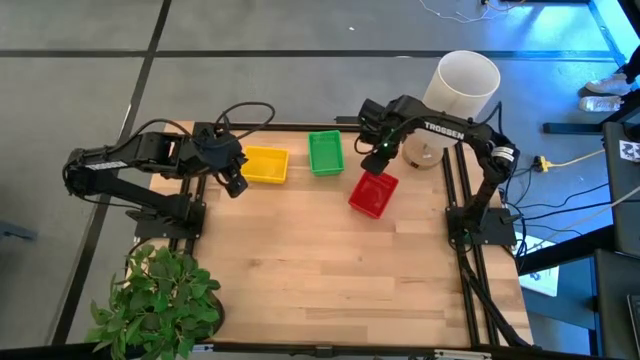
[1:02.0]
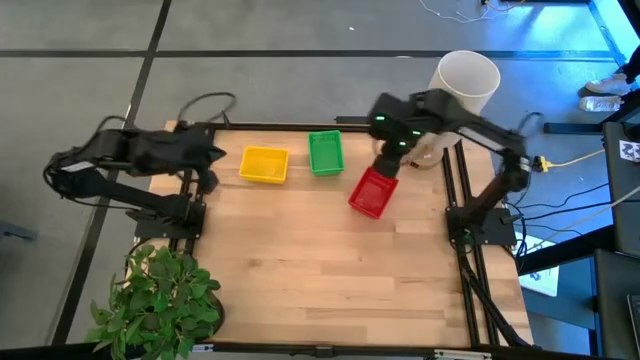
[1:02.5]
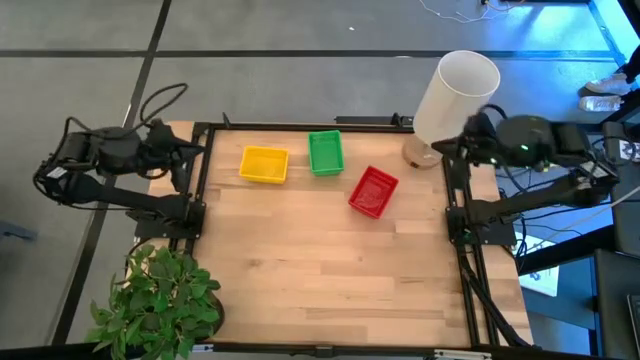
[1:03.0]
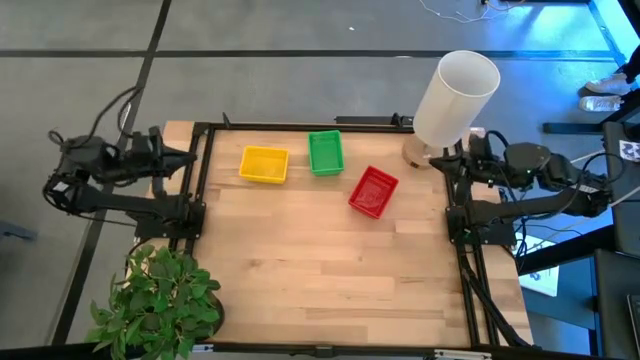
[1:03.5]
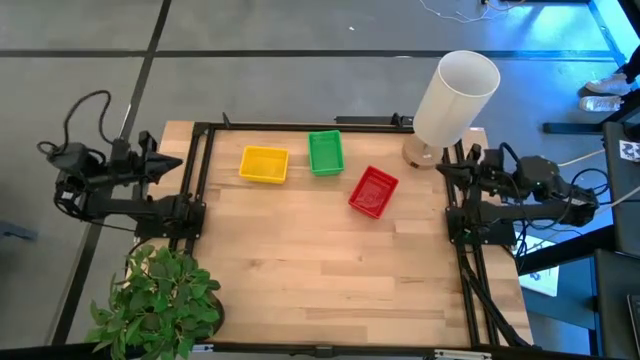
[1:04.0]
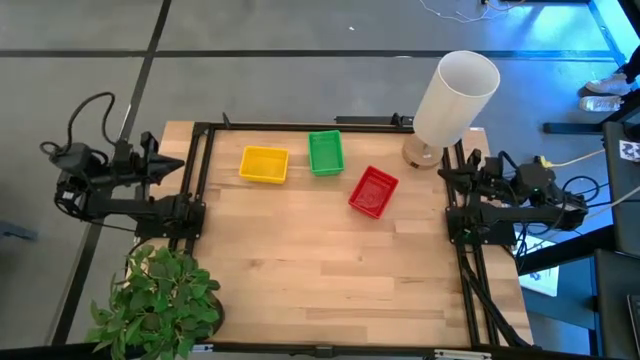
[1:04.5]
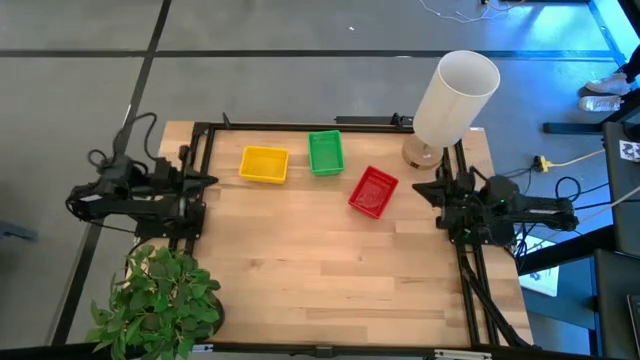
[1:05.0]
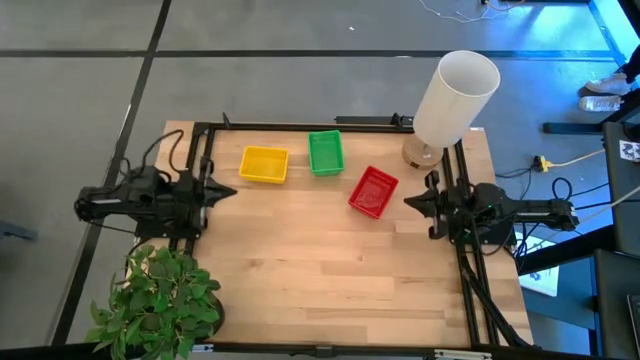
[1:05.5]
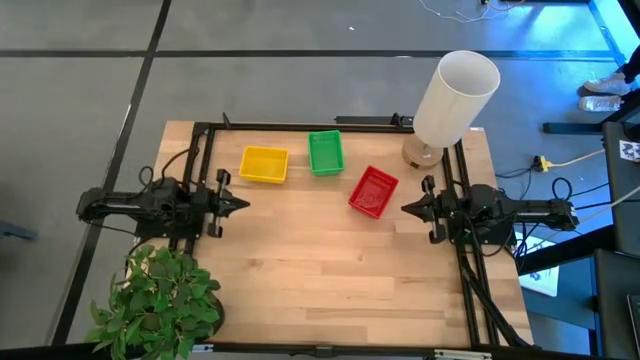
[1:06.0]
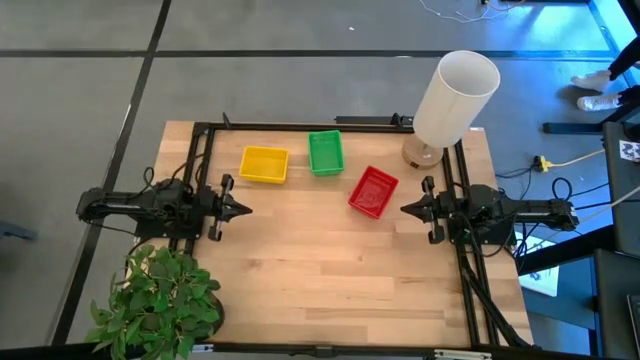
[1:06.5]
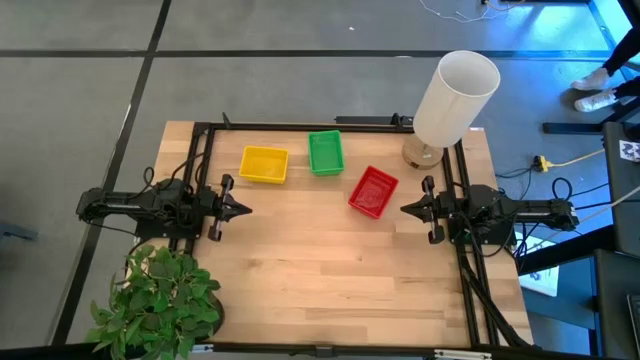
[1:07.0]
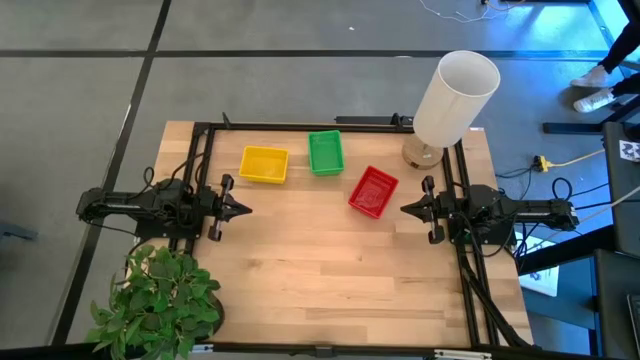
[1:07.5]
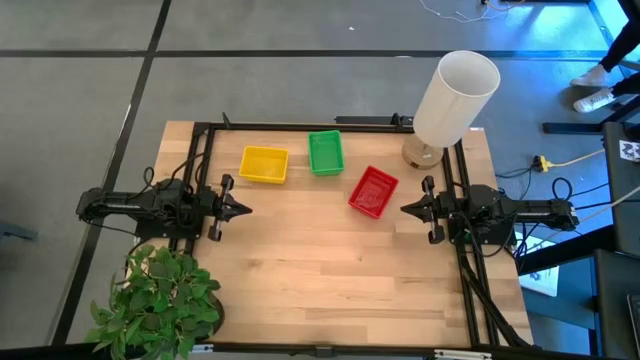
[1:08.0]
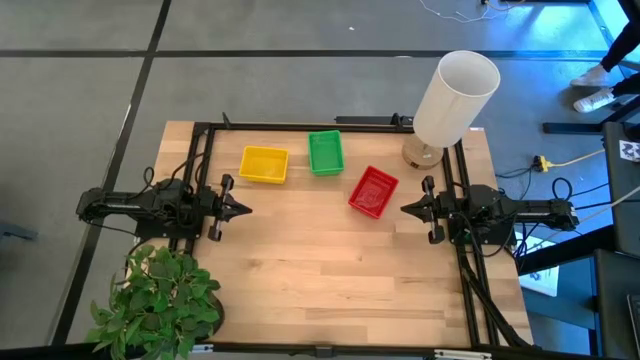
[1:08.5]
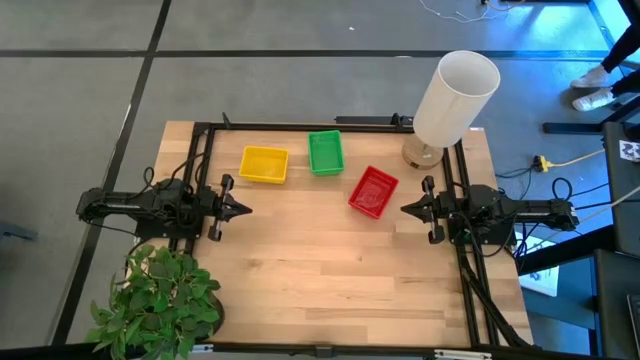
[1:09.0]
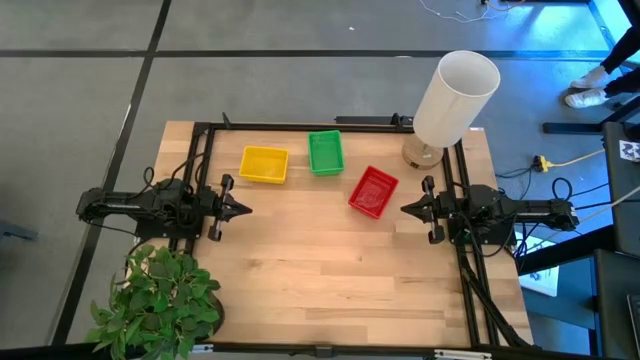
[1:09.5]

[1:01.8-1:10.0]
Return to home position

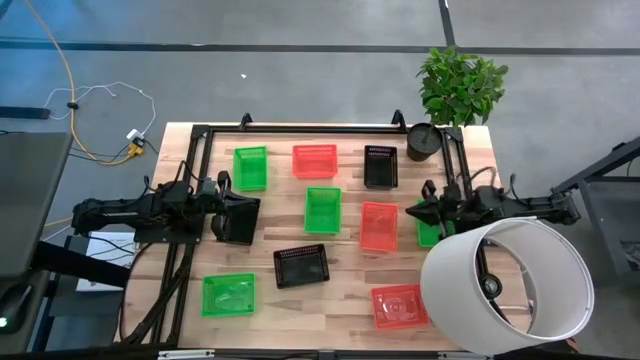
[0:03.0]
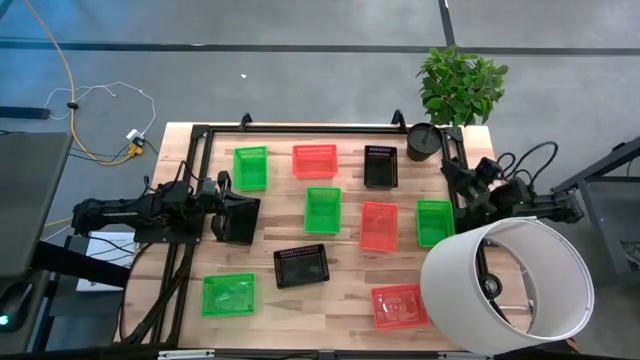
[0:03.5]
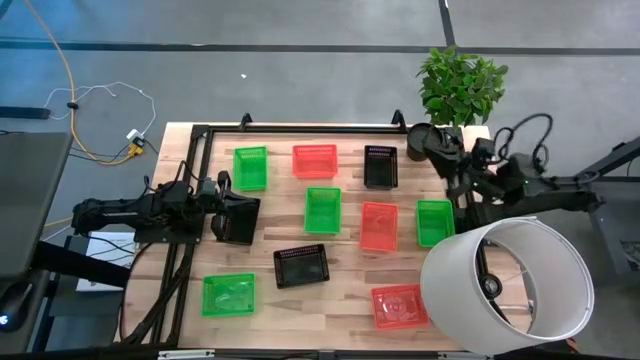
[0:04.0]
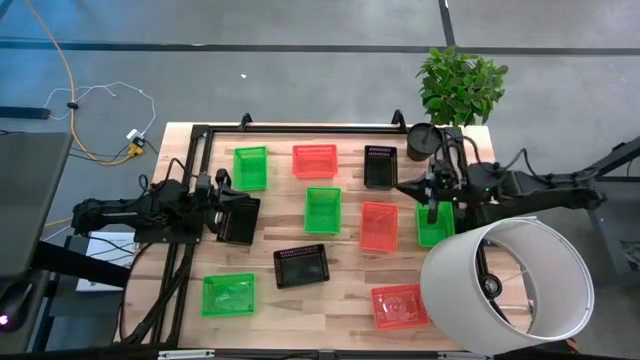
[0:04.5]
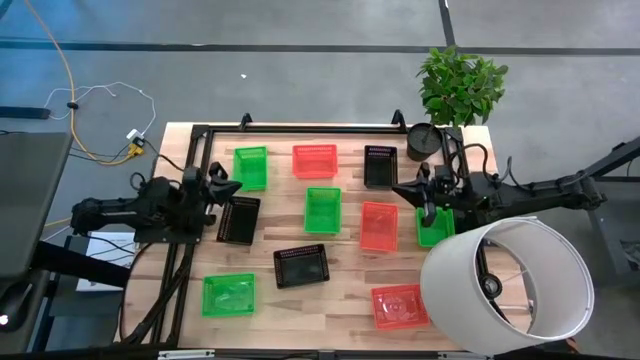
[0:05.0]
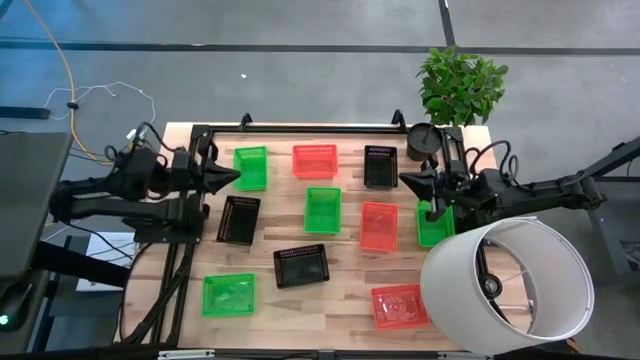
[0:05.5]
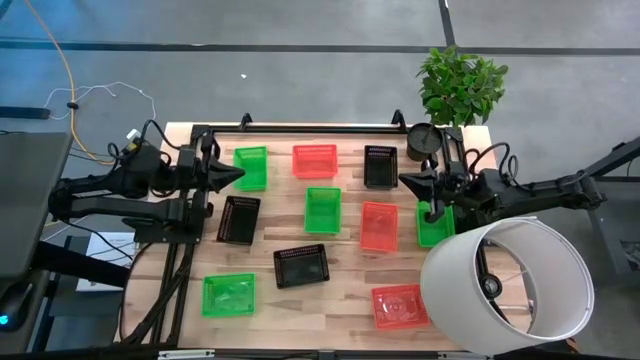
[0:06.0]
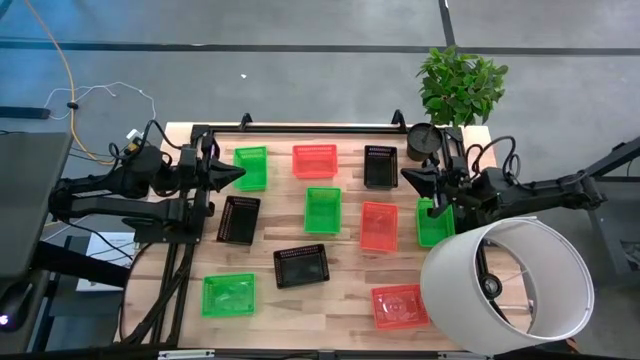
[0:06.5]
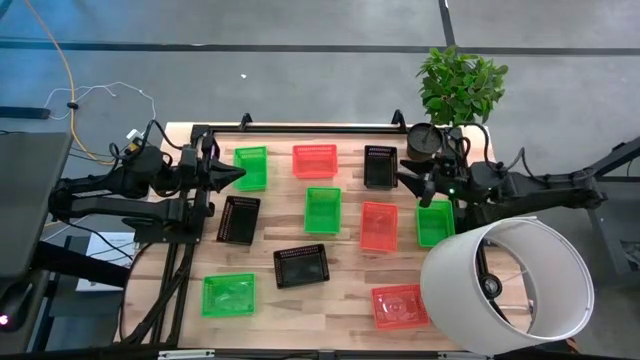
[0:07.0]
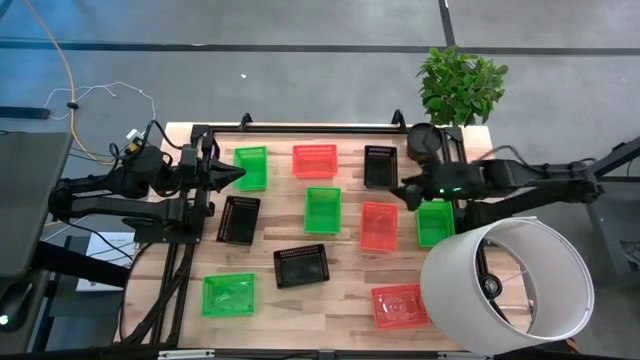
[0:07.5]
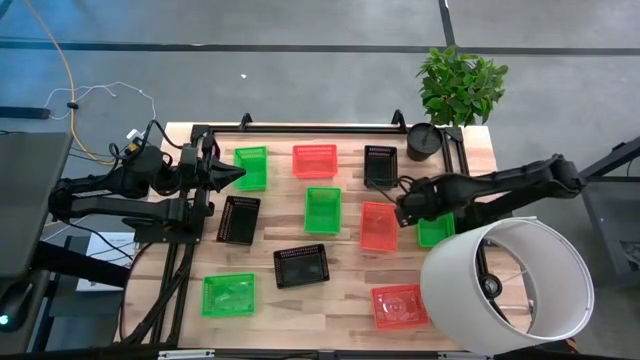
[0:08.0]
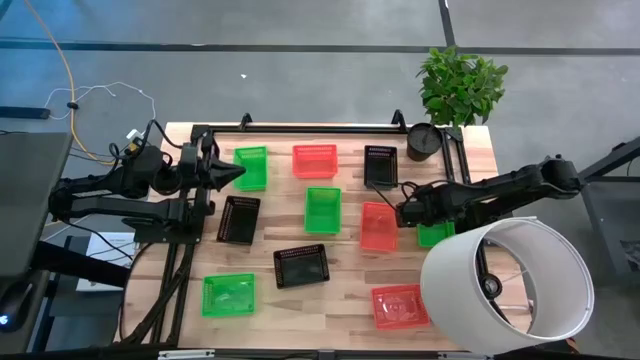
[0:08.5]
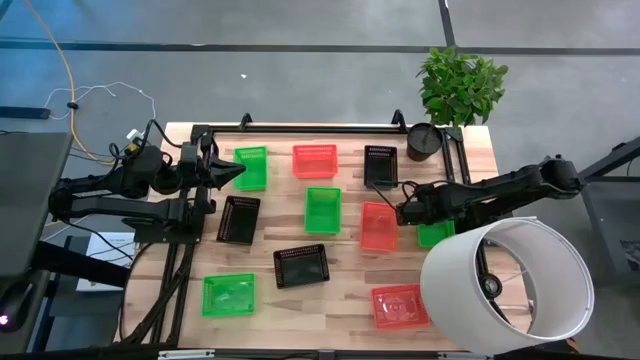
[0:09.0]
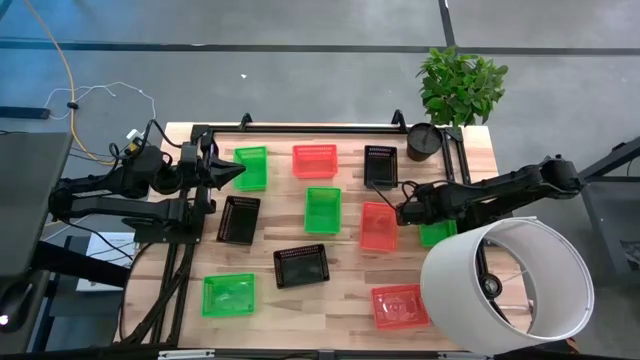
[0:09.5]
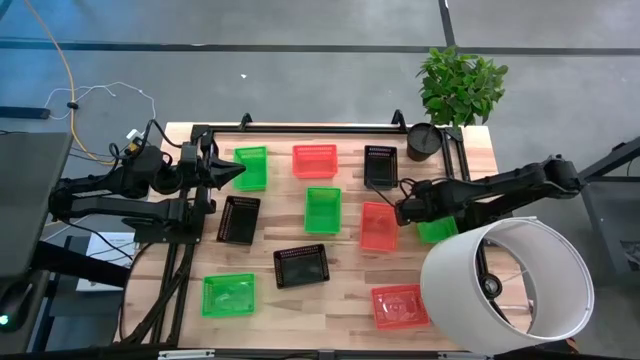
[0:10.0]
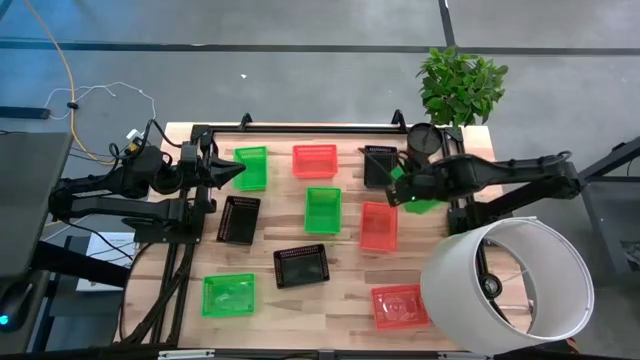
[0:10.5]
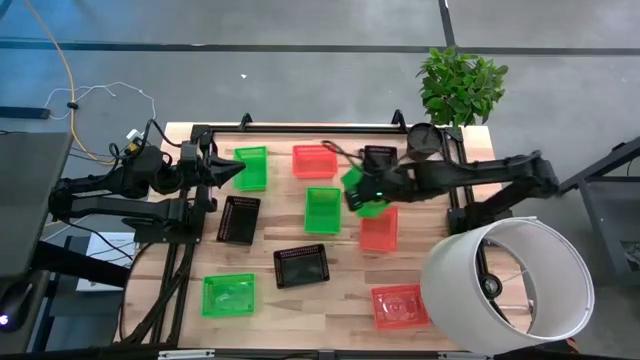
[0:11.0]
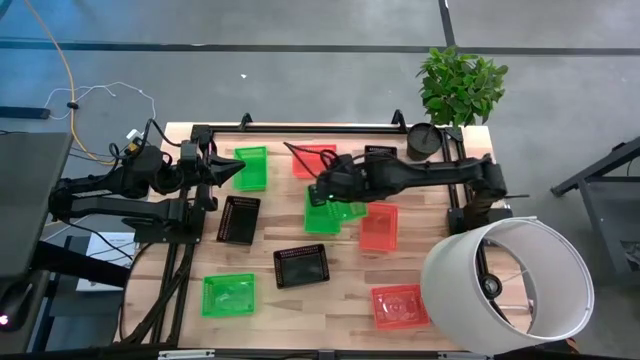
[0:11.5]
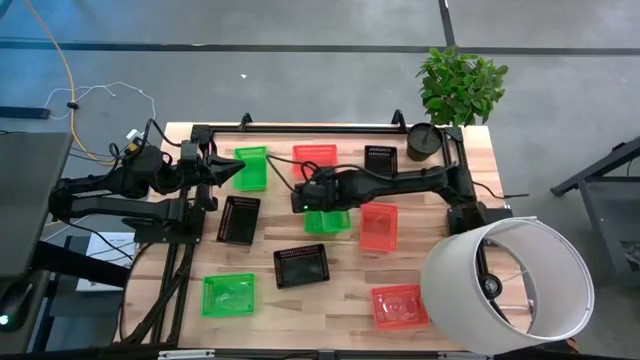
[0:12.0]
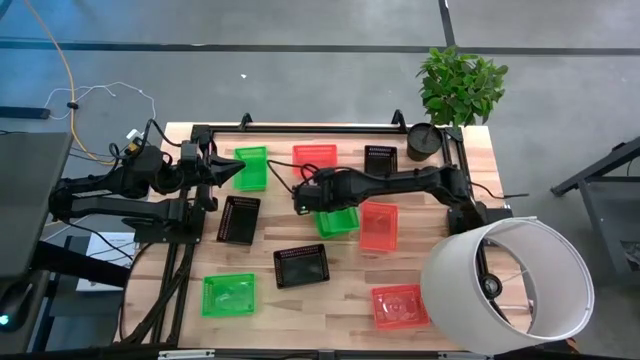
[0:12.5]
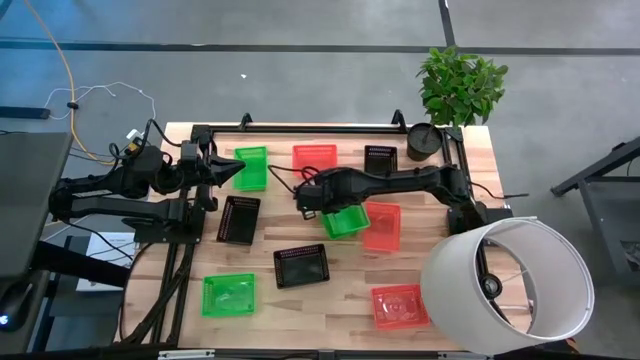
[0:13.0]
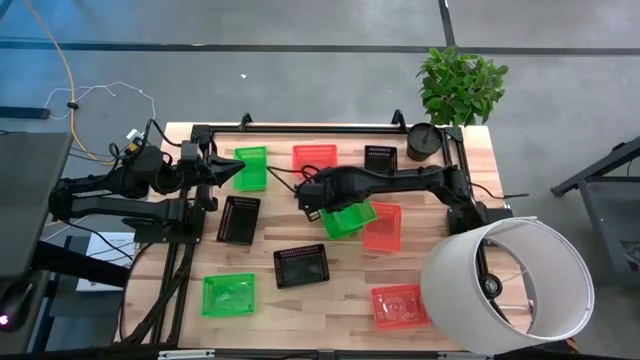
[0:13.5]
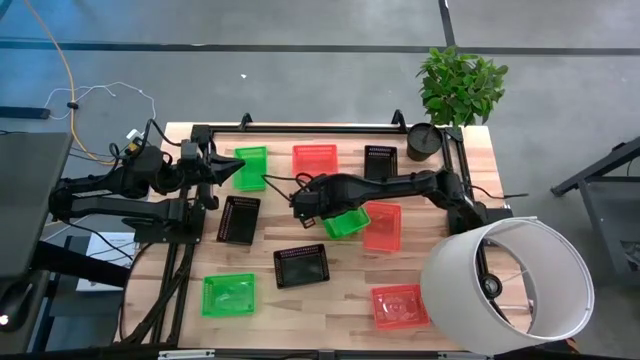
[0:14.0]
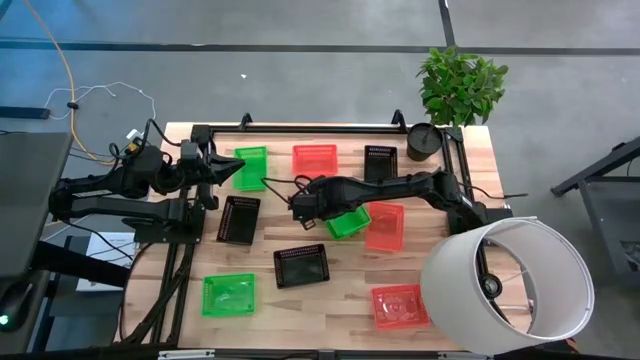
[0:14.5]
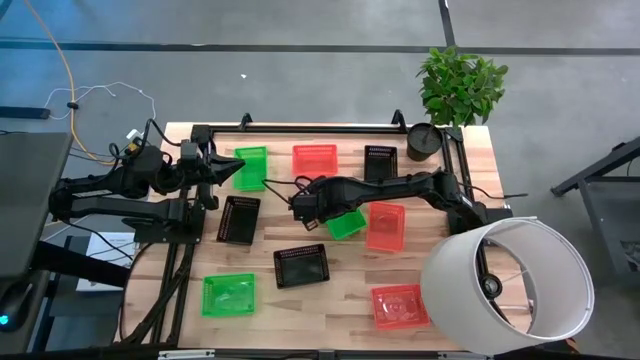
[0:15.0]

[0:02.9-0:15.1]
Stack the green basket on the green basket
